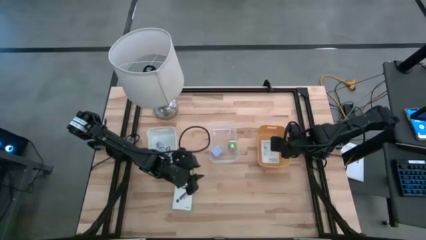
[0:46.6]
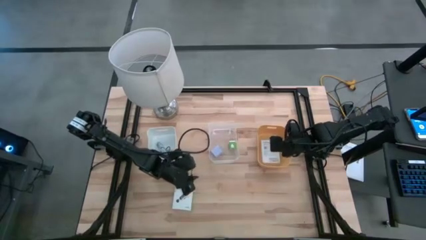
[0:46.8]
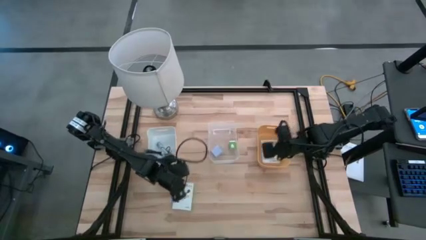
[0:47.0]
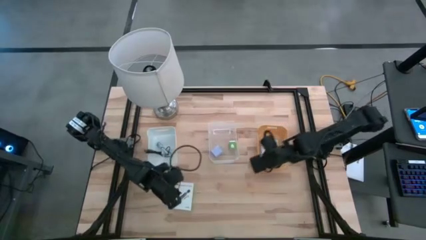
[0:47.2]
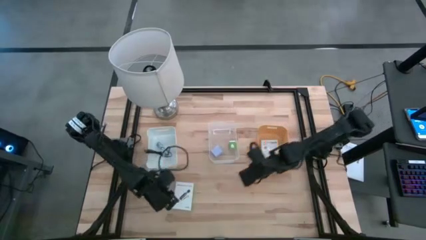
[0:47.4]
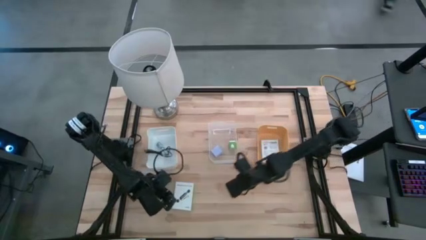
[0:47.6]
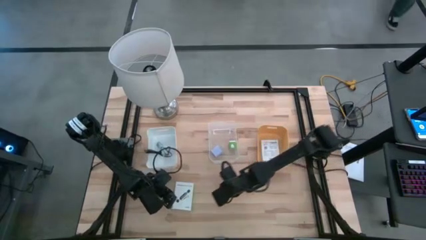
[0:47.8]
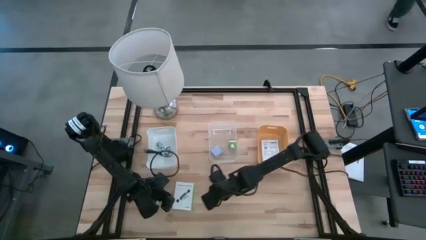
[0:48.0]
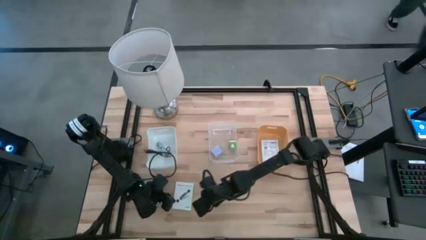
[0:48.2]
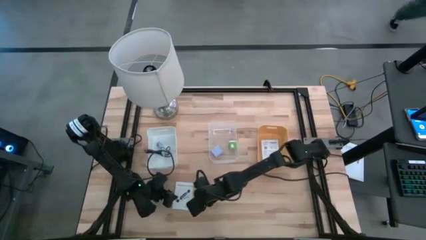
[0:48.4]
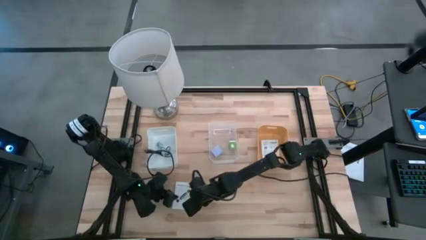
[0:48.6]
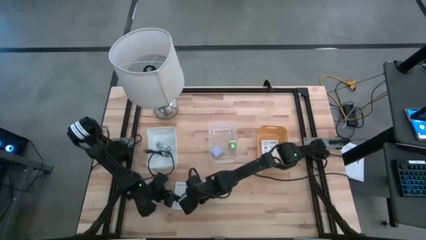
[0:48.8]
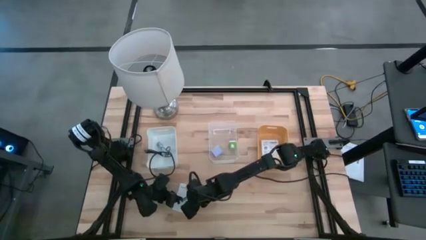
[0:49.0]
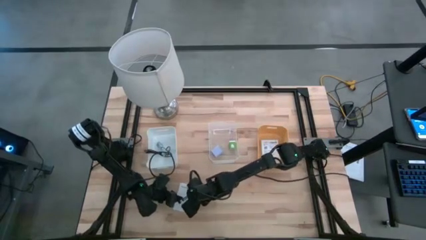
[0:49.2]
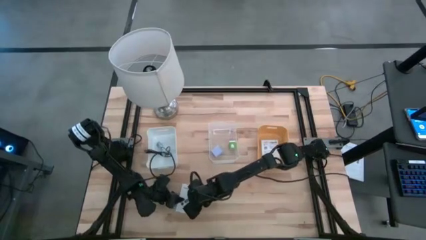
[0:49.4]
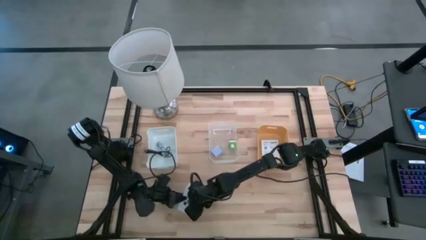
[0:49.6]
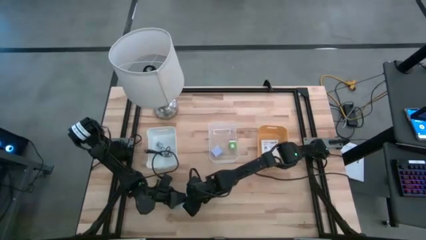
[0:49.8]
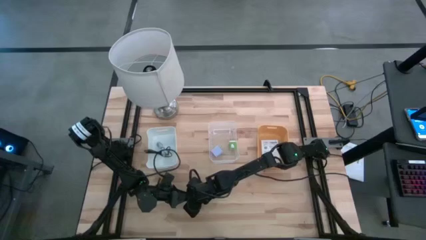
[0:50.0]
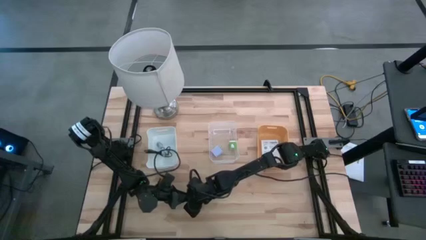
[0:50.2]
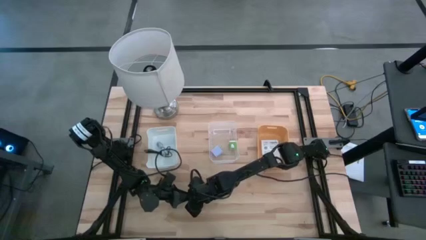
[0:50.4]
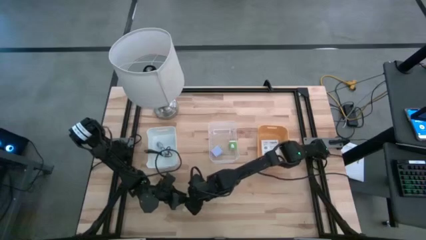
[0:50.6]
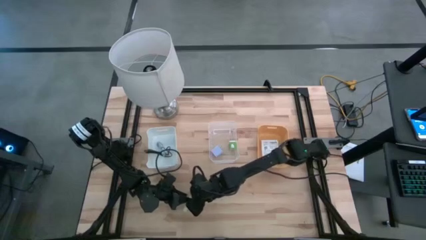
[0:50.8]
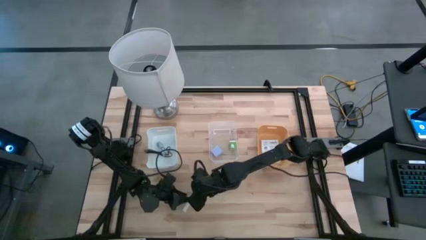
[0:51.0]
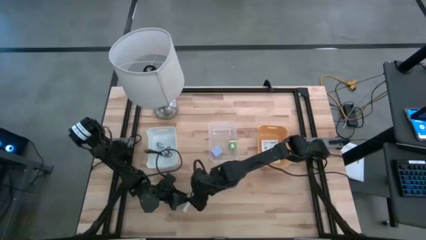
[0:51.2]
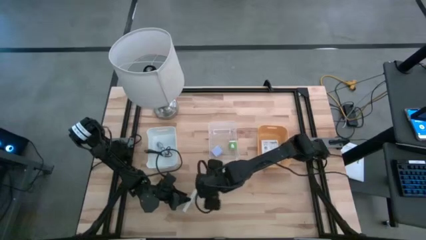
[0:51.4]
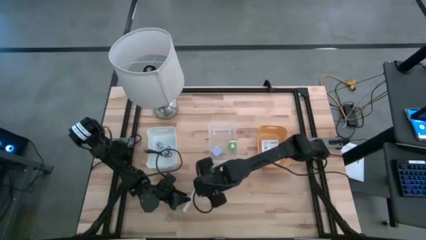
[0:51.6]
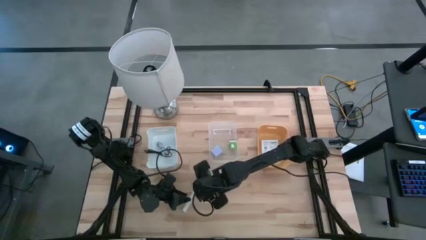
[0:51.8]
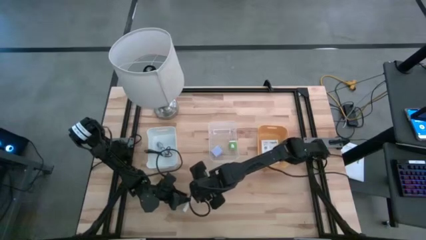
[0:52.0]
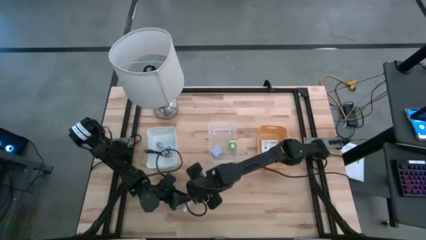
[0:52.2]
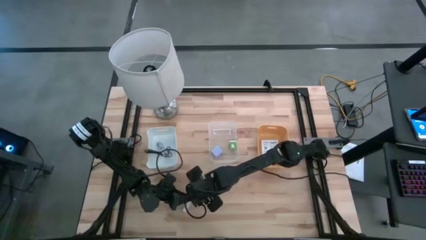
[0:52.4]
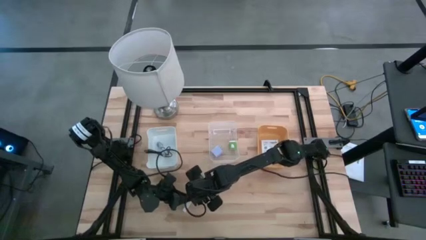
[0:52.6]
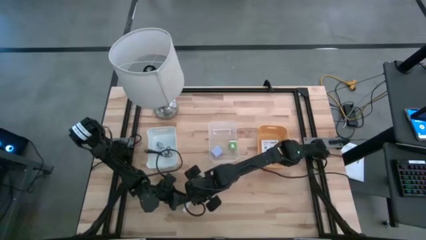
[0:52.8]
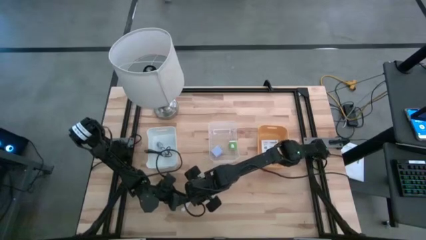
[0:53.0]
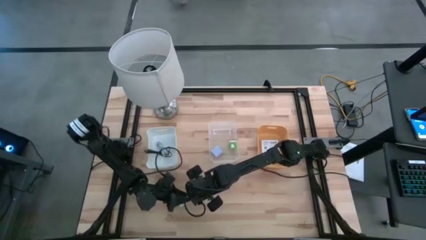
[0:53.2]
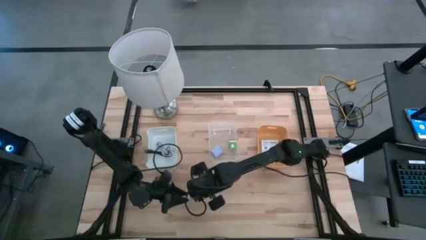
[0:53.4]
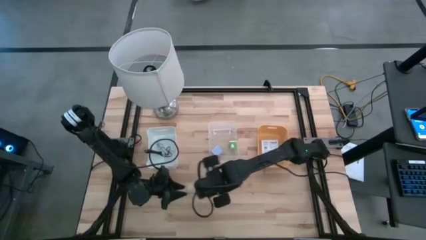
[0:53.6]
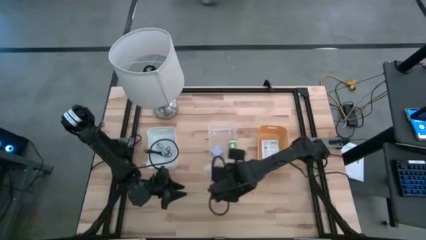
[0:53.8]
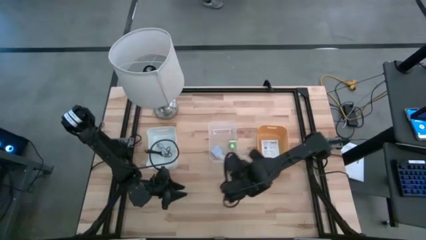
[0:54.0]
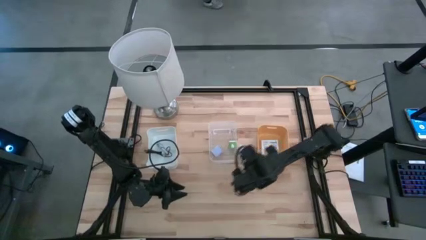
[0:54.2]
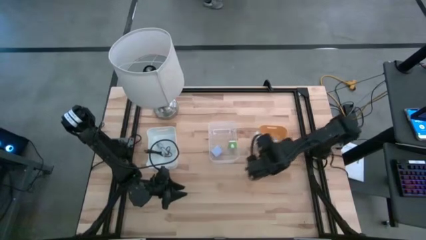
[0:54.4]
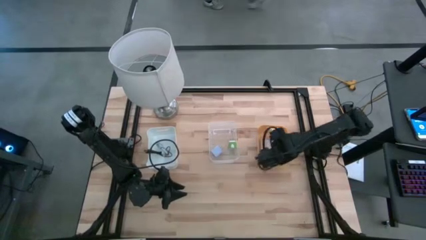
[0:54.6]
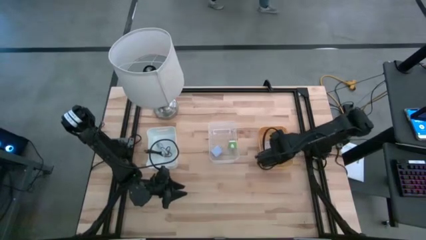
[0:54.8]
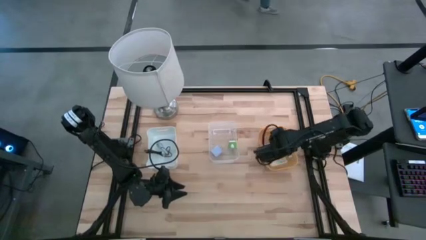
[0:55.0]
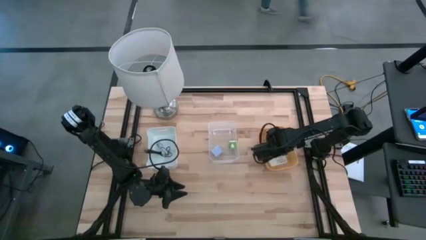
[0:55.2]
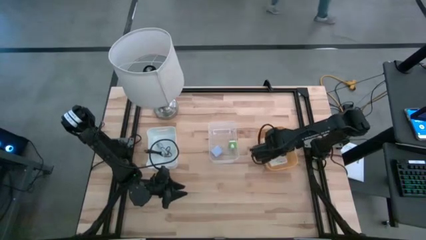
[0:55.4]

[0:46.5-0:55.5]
Task: Pick and place items into bin
Put the card box into the yellow bin

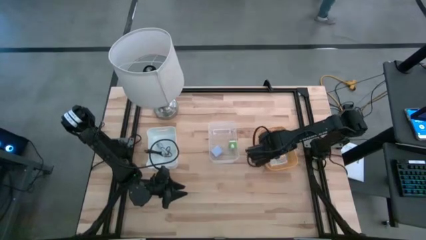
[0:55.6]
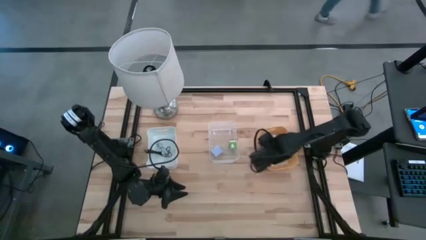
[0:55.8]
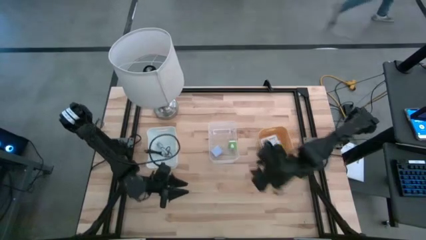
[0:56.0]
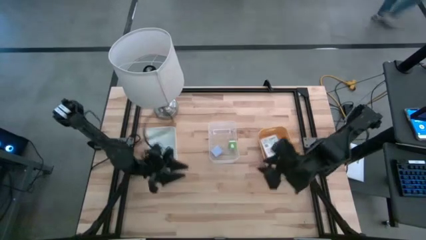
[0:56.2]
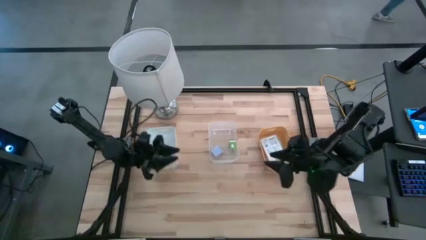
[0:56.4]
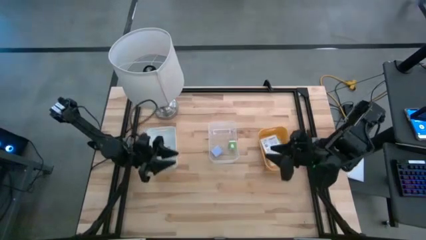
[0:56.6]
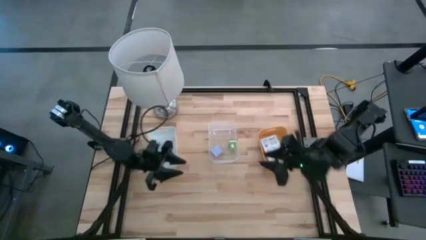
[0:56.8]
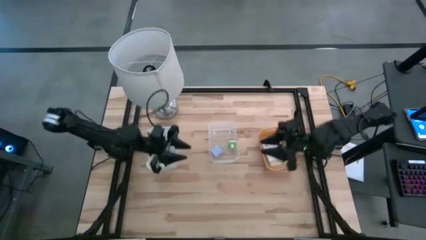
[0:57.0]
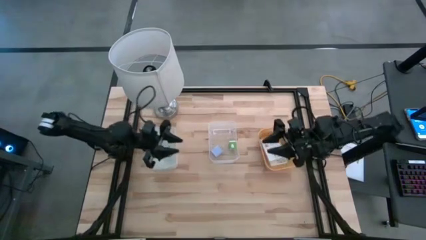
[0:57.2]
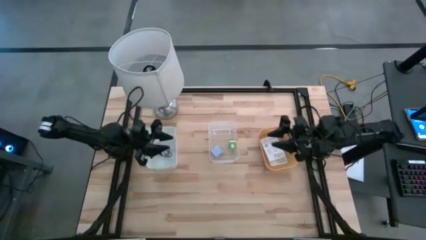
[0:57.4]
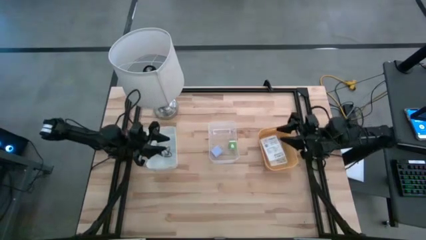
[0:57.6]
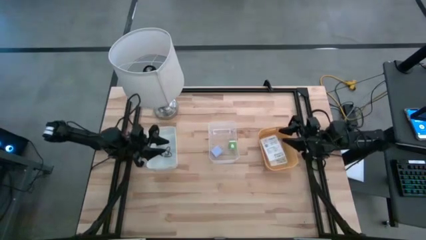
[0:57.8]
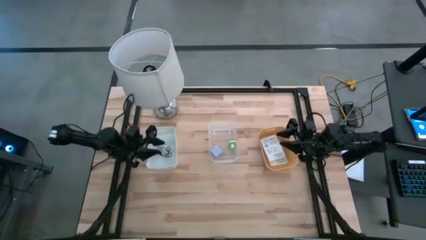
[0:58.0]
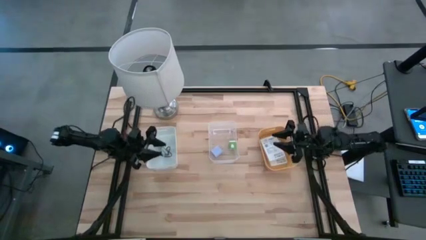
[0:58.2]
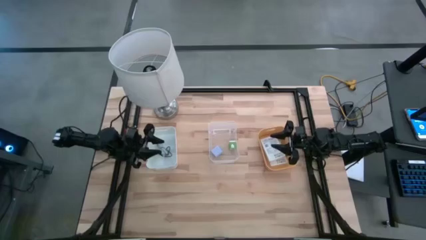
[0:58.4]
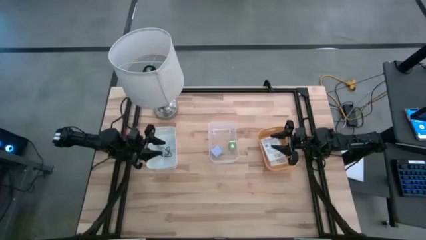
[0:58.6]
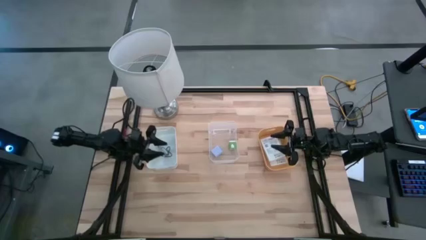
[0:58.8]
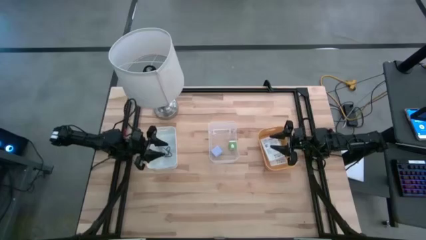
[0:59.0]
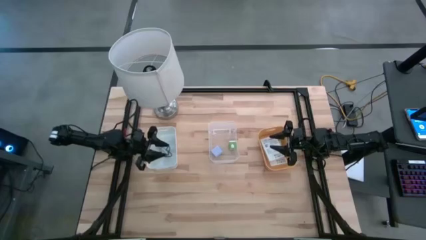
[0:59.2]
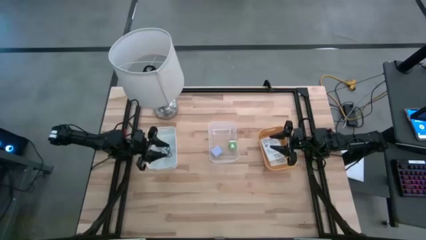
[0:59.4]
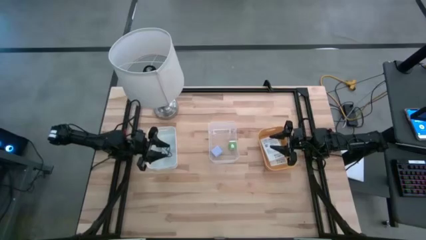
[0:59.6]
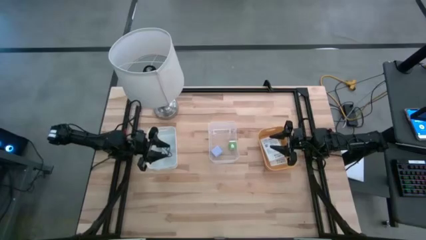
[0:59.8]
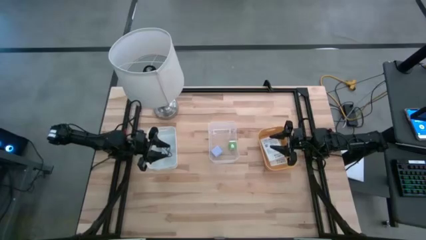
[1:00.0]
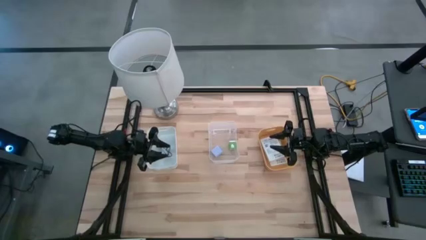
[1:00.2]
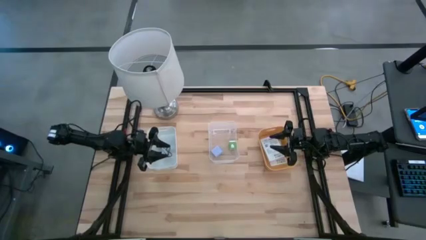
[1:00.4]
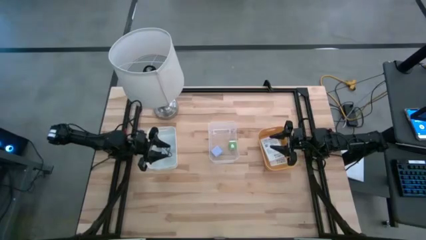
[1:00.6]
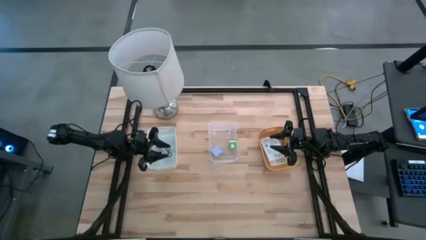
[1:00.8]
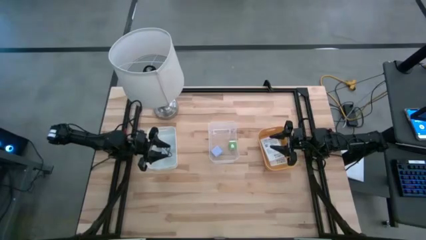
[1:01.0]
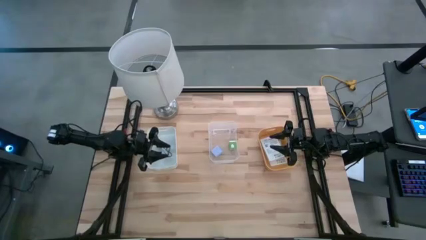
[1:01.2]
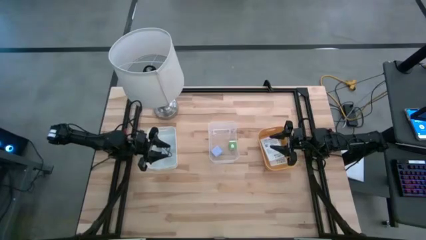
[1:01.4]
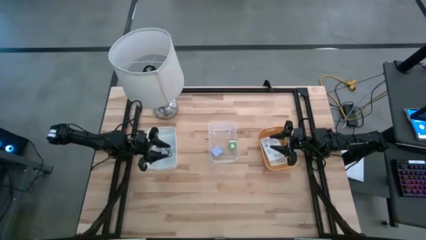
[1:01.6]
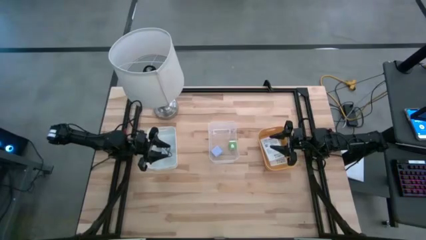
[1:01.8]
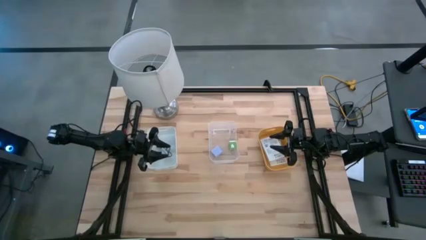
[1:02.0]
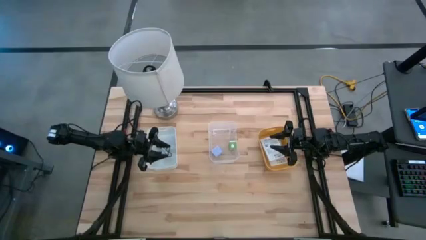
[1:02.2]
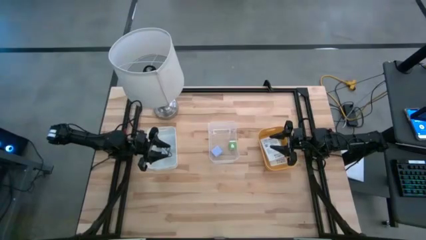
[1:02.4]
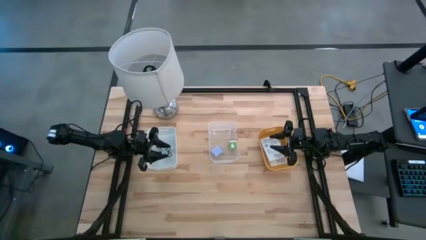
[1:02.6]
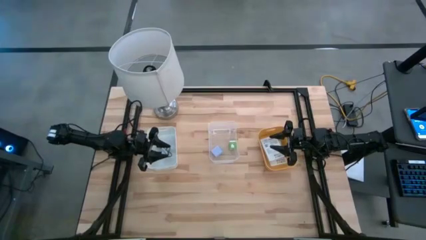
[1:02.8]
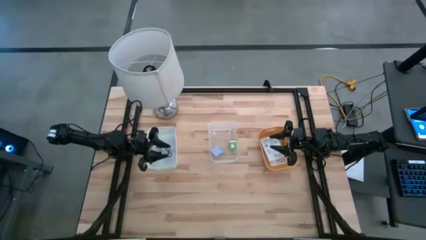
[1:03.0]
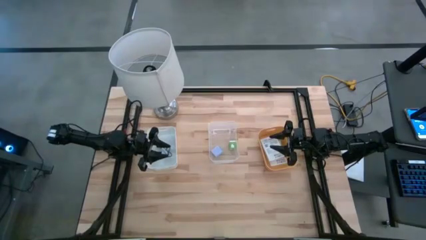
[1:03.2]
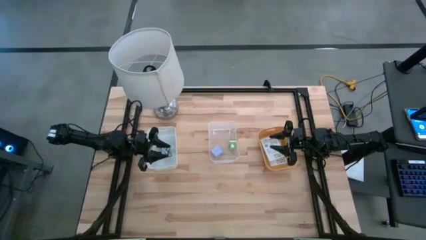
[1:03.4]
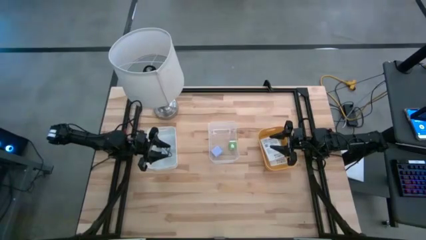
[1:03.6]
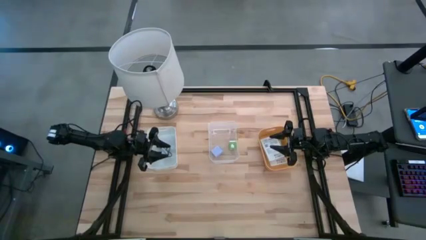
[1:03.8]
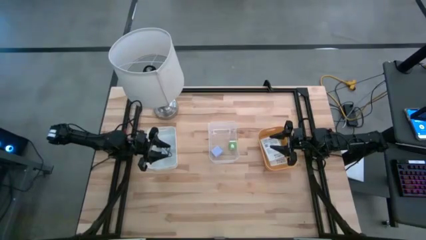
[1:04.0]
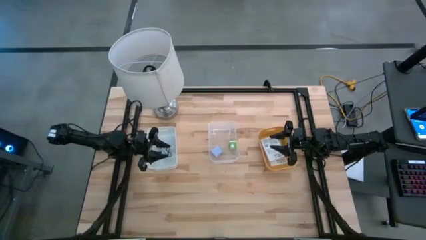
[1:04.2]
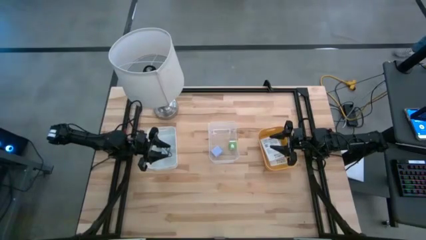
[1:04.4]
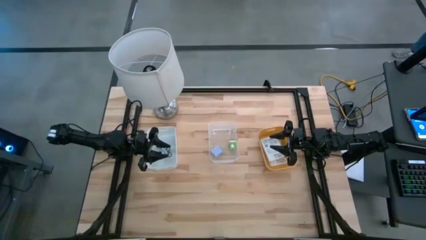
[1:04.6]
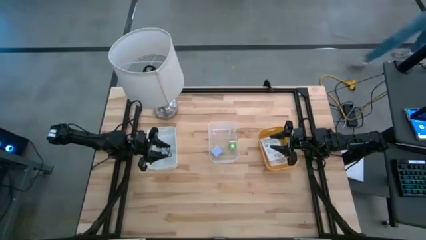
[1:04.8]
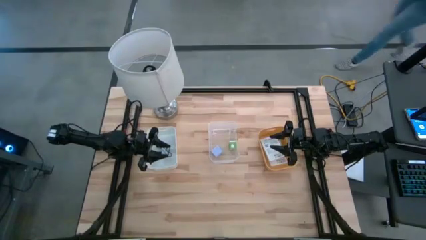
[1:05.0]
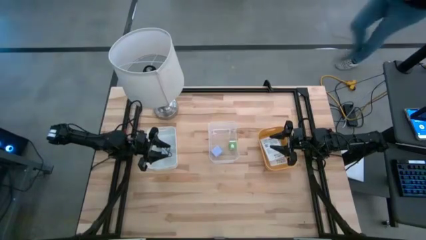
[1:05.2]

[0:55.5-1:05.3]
Return to Home Position
